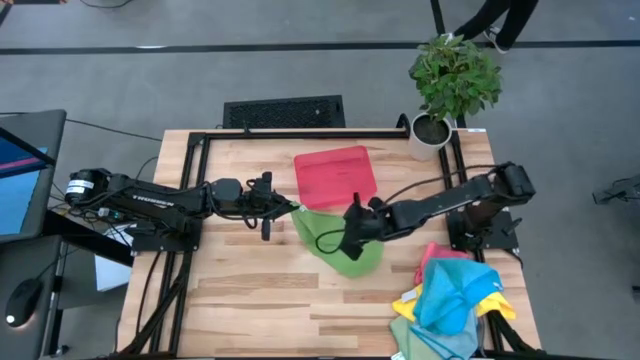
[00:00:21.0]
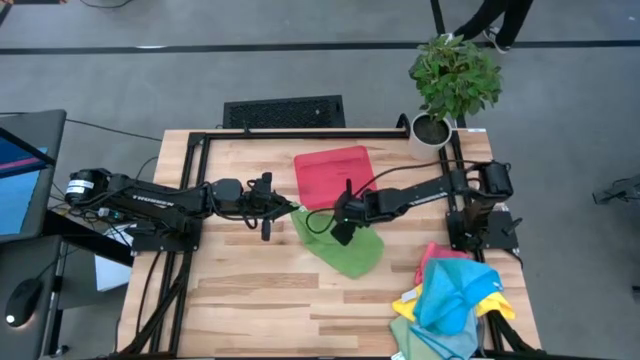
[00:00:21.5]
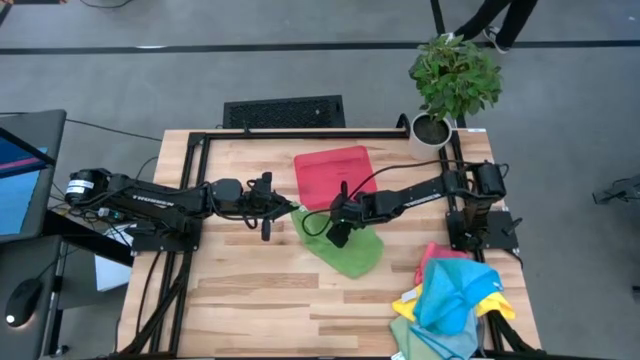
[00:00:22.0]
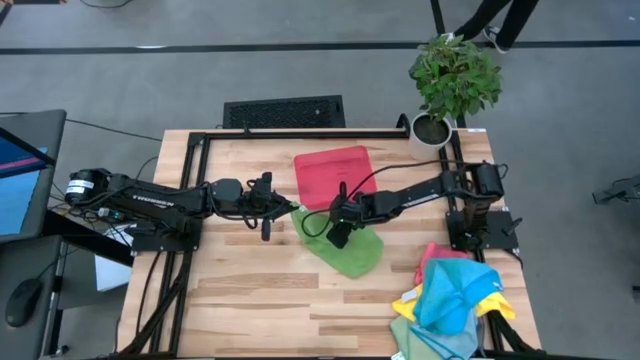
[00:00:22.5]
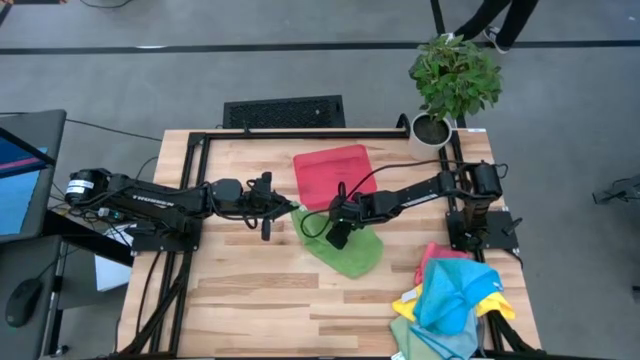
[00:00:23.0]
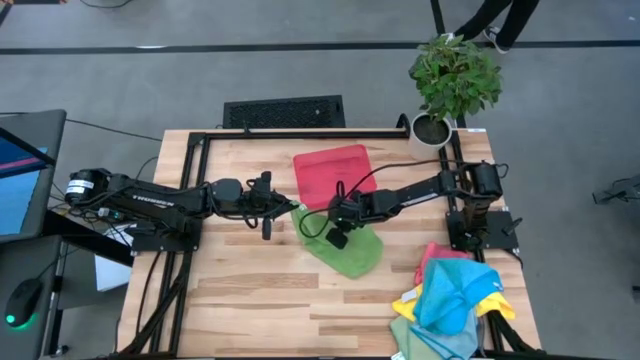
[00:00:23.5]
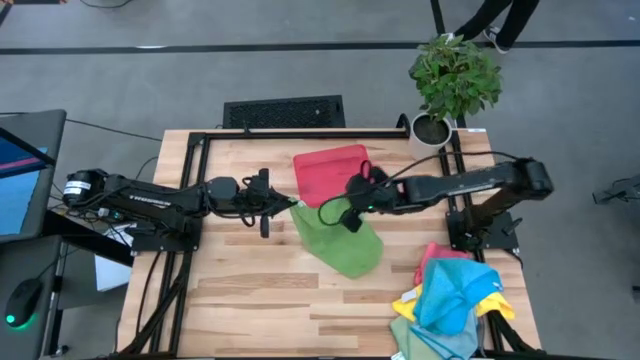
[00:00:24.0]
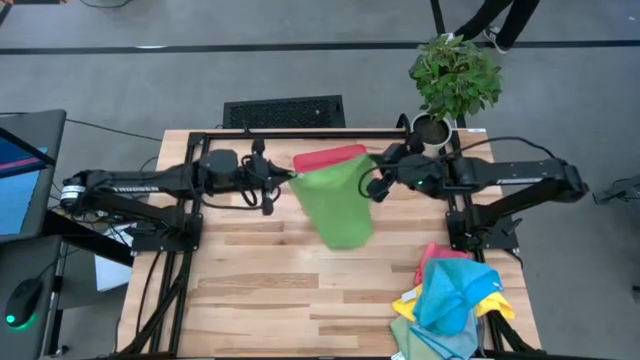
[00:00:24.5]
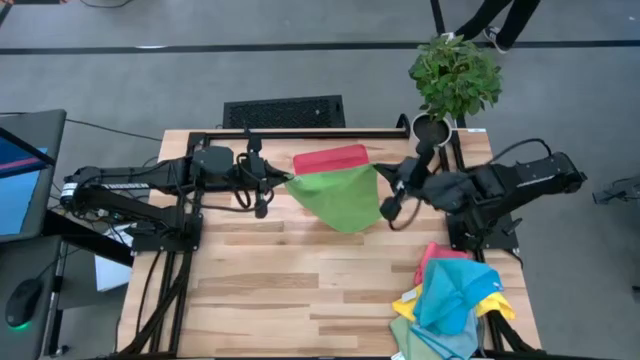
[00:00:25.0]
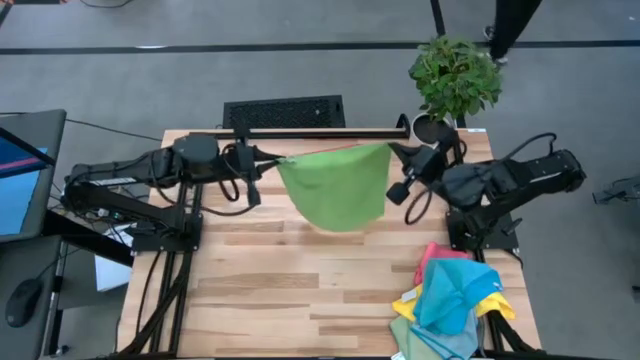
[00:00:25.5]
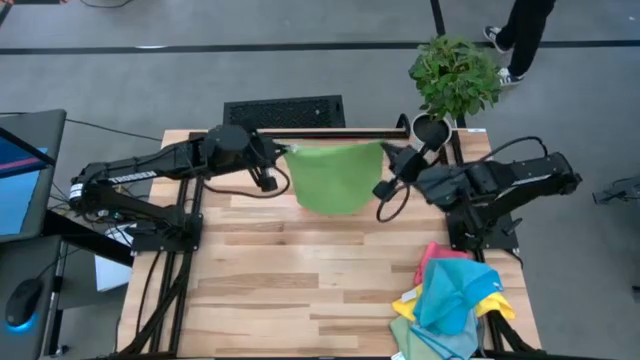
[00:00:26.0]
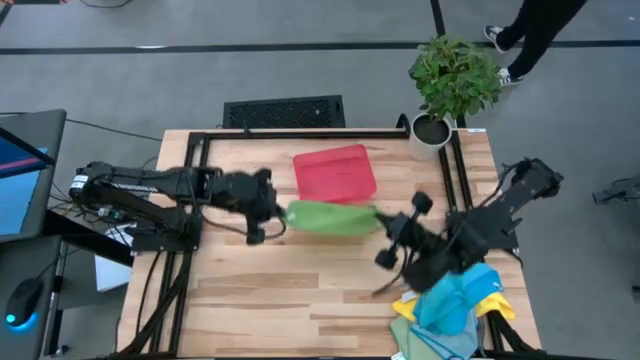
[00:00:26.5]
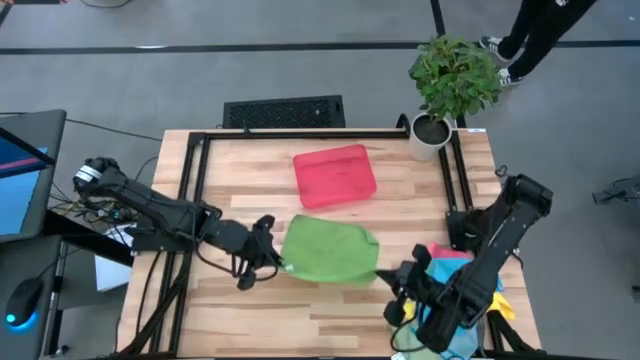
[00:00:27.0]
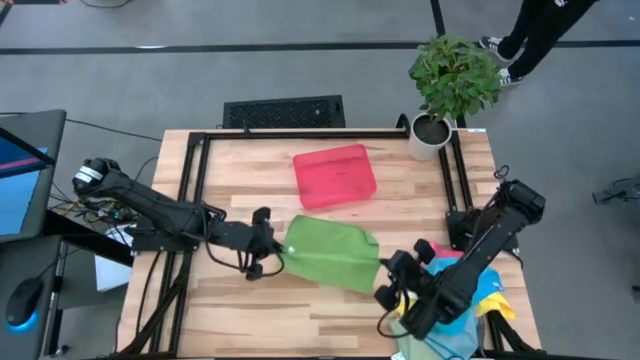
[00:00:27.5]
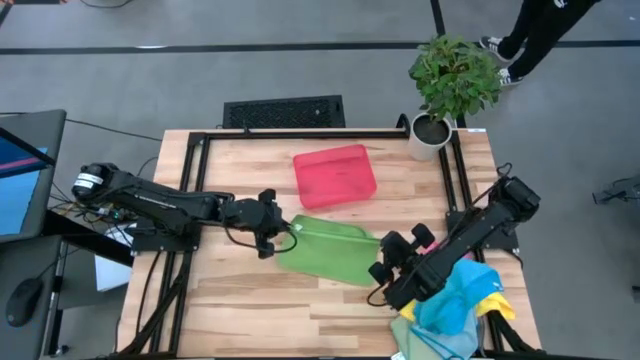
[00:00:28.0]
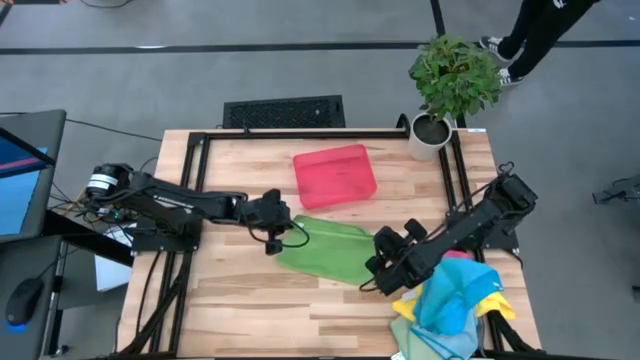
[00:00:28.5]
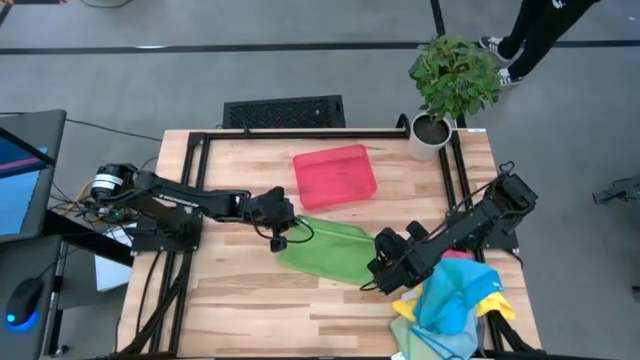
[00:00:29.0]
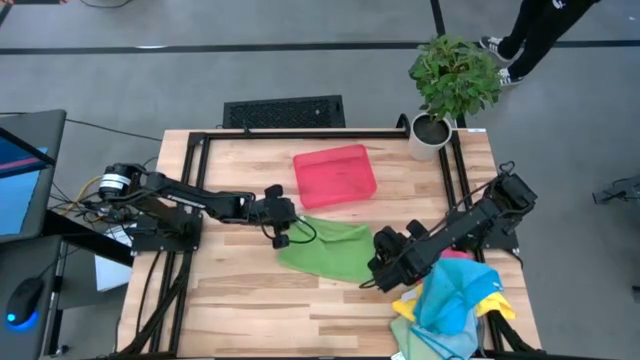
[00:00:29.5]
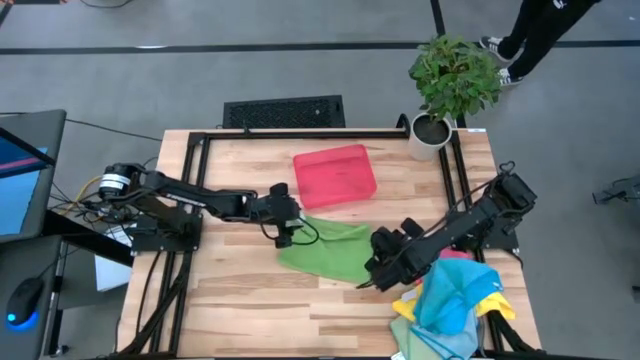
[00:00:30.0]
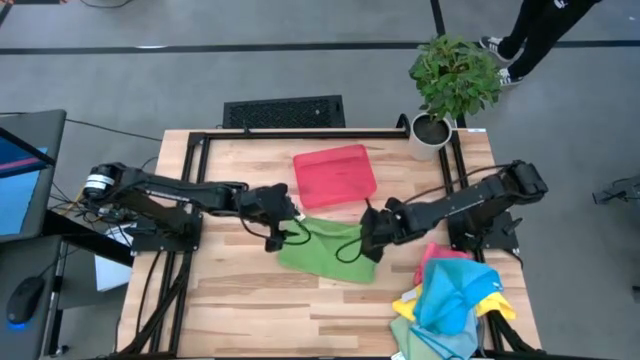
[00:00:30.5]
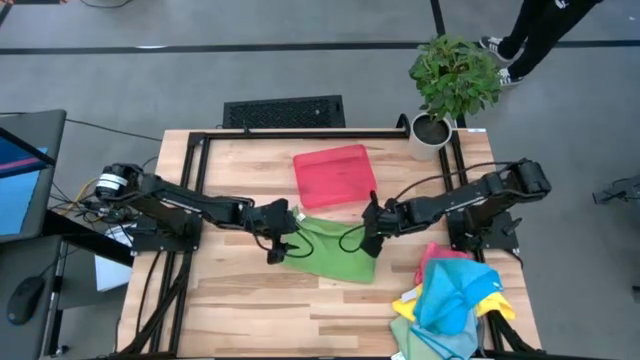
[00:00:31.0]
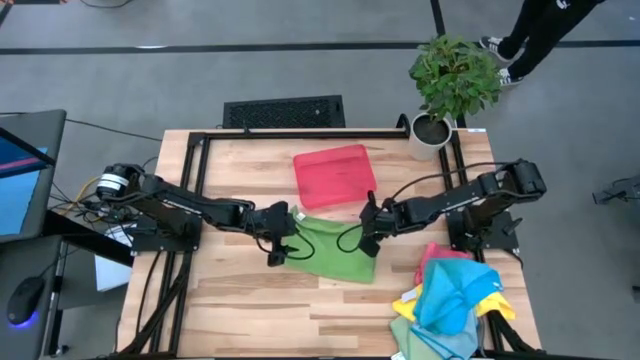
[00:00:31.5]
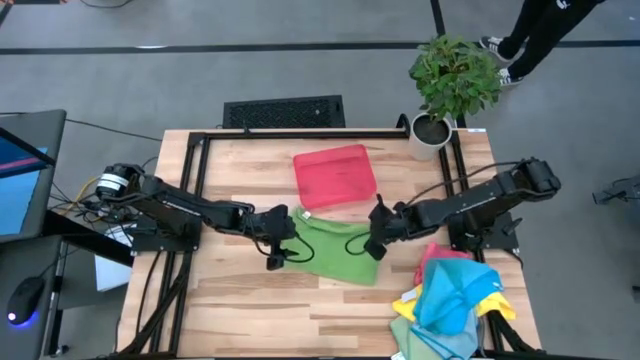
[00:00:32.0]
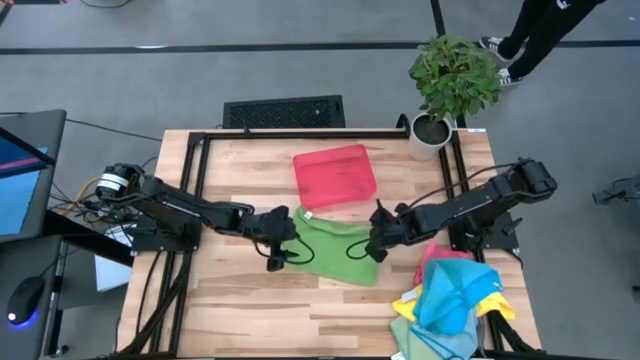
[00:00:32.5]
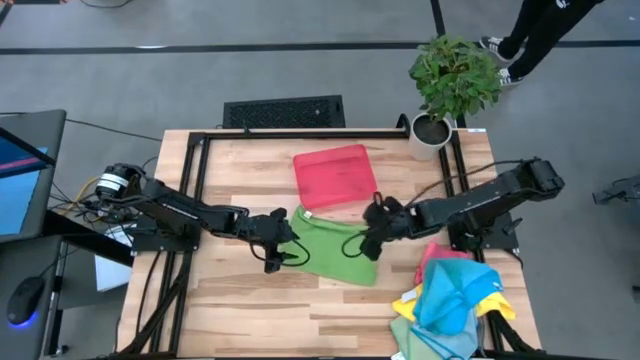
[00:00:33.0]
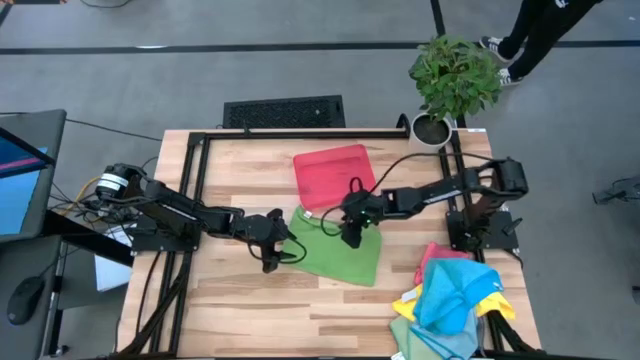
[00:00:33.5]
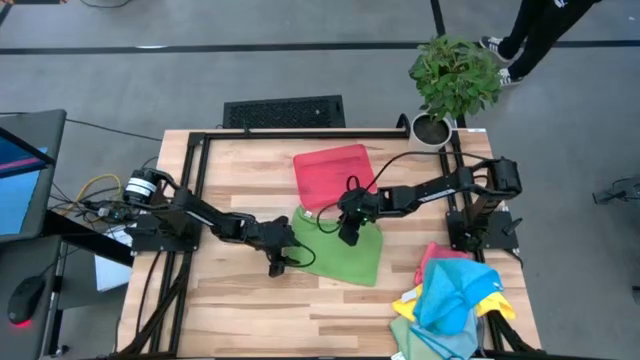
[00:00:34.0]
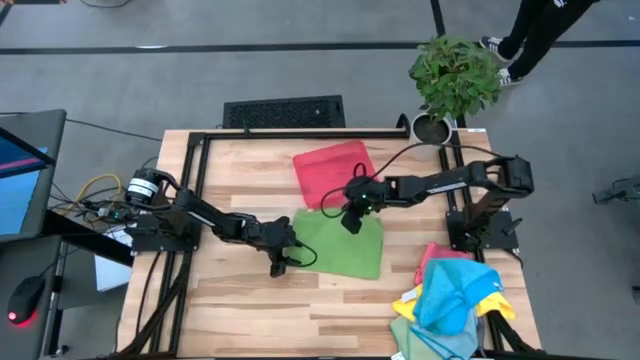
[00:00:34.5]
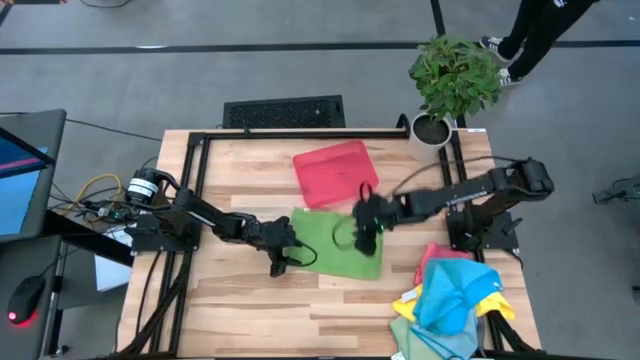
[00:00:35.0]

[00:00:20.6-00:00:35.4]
Task: Fold microfiber towels
Fold the green microfiber cloth

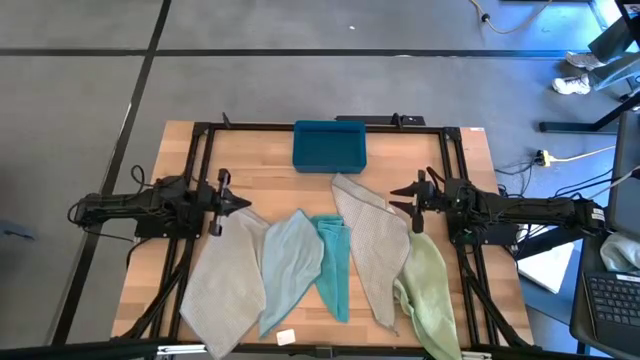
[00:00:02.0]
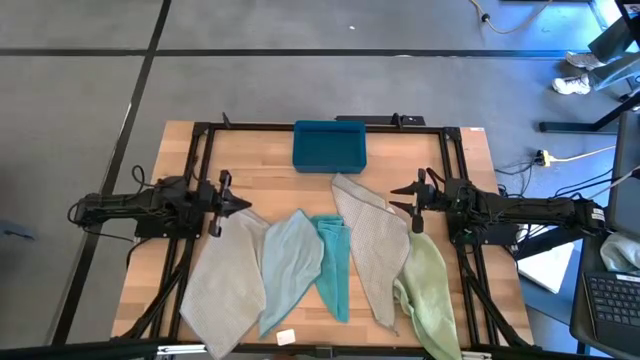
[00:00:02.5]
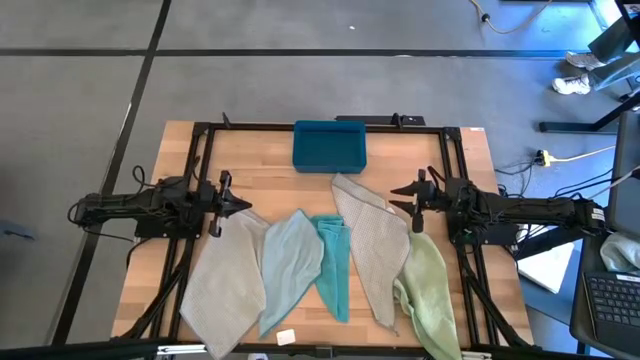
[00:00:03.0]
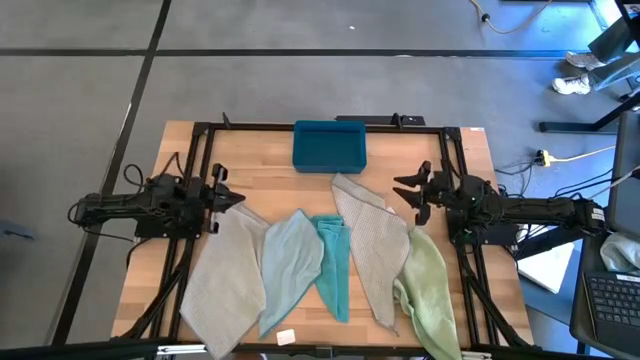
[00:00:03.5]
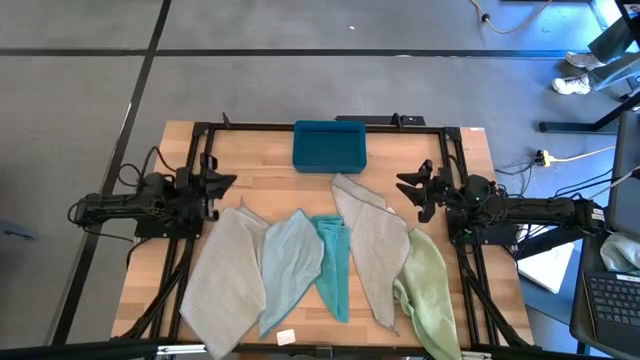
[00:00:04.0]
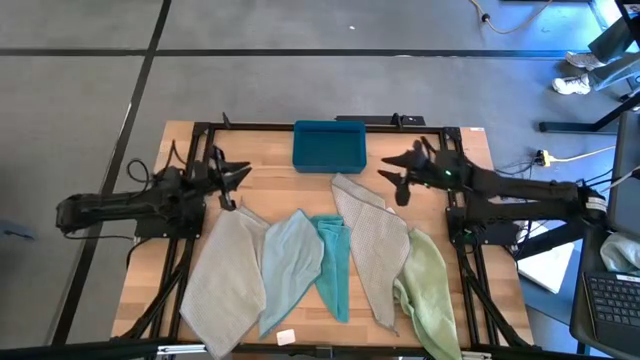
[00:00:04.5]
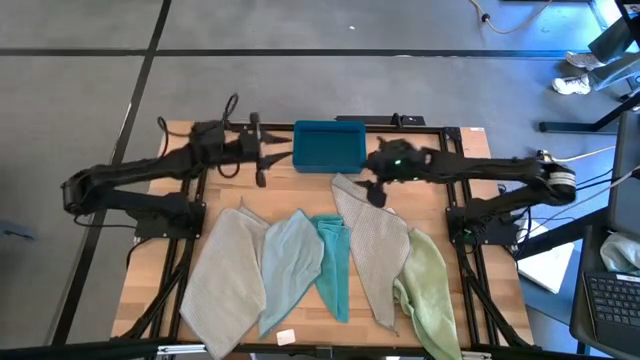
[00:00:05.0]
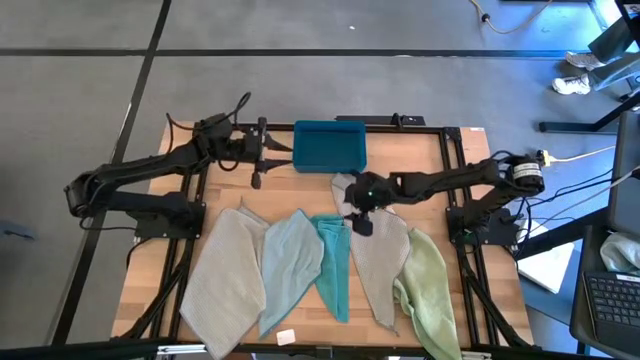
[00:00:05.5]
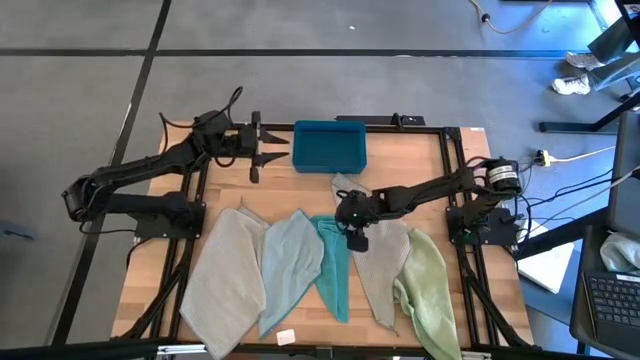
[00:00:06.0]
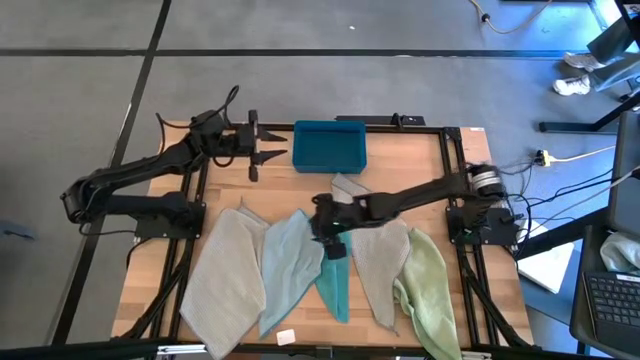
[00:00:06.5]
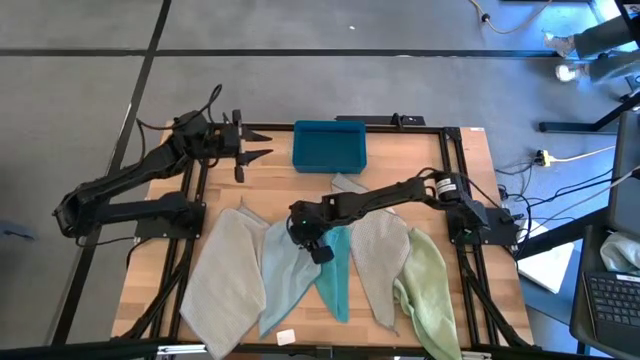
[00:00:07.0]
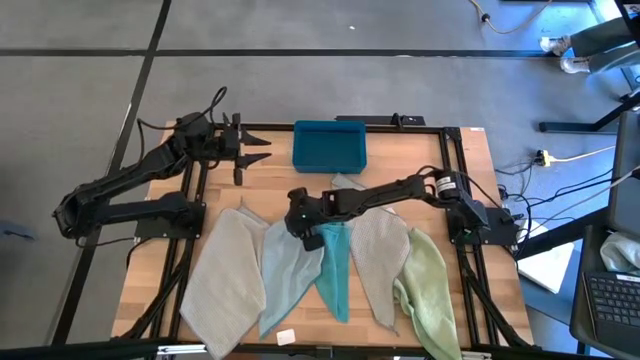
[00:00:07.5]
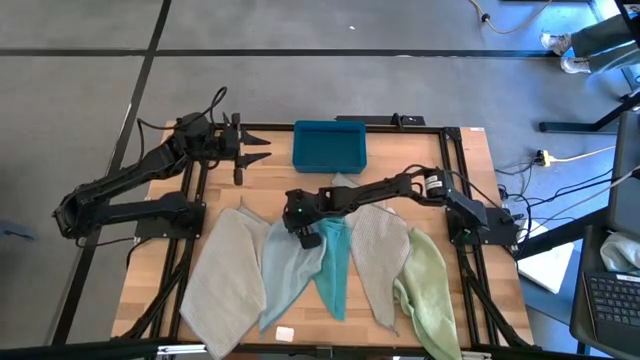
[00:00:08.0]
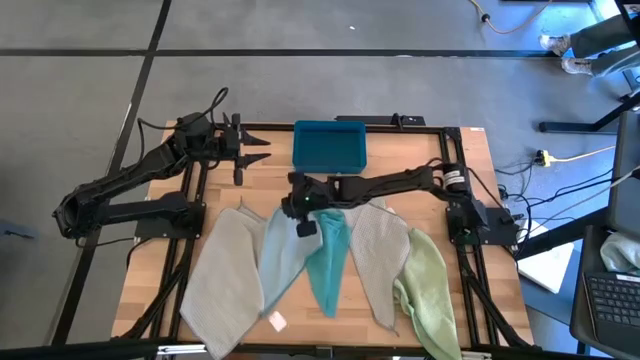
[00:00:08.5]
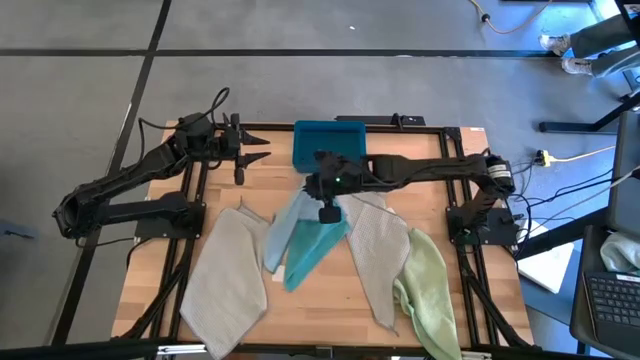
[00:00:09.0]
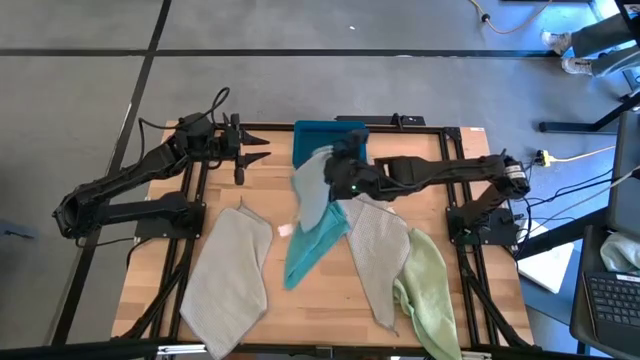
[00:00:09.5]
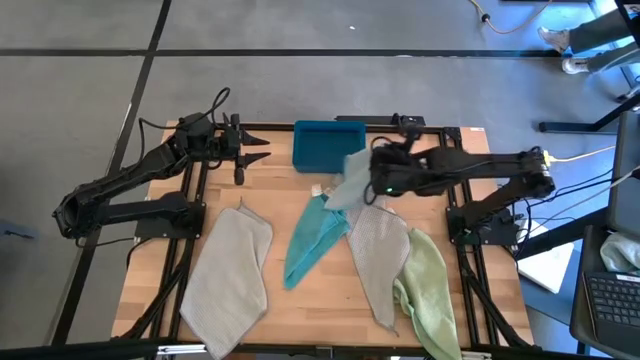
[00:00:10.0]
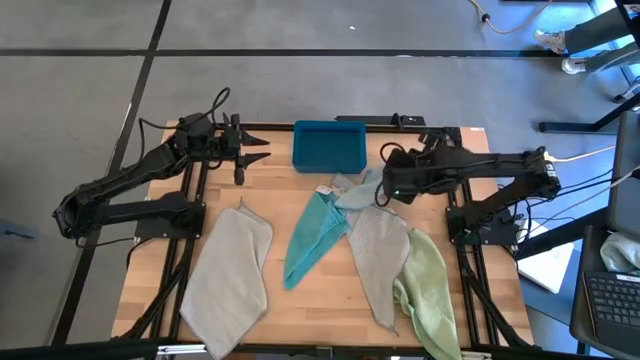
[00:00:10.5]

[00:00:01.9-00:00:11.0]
Task: Fold microfiber towels
Move the light blue towel to the top right of the table
